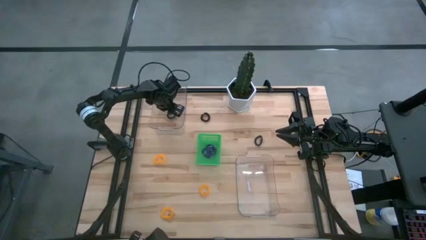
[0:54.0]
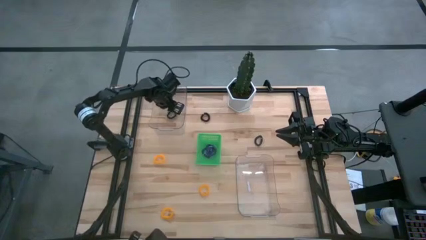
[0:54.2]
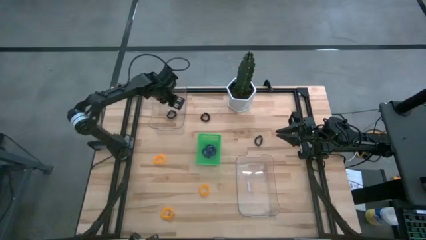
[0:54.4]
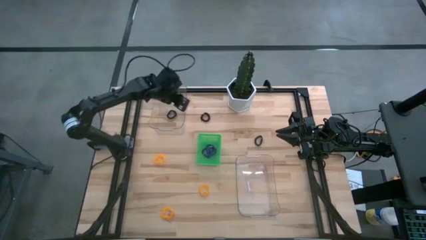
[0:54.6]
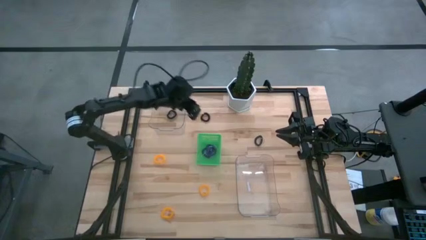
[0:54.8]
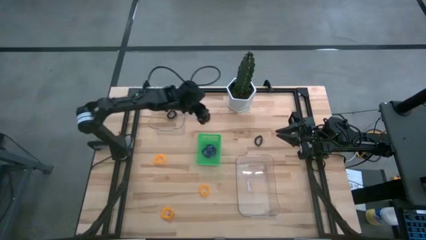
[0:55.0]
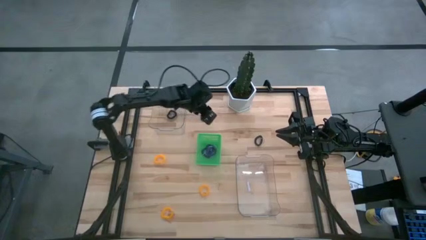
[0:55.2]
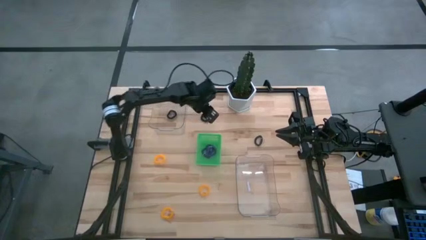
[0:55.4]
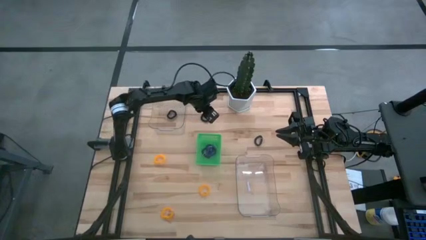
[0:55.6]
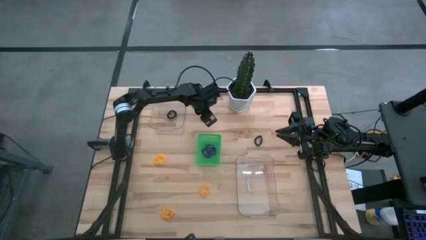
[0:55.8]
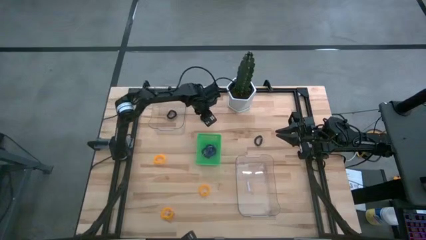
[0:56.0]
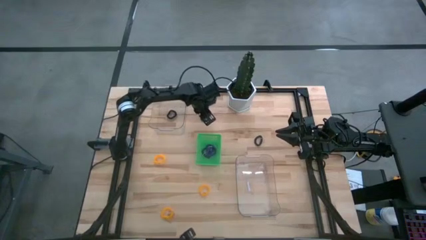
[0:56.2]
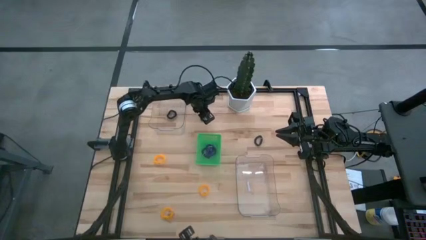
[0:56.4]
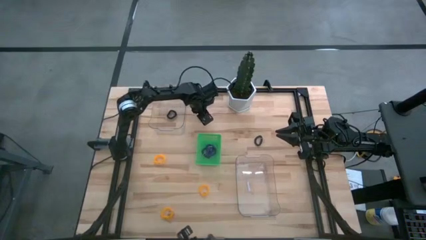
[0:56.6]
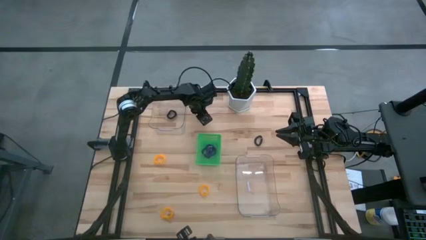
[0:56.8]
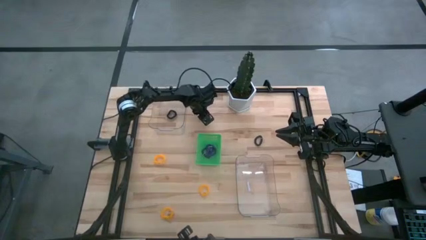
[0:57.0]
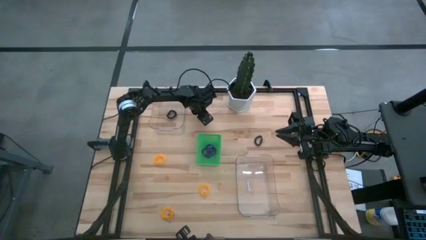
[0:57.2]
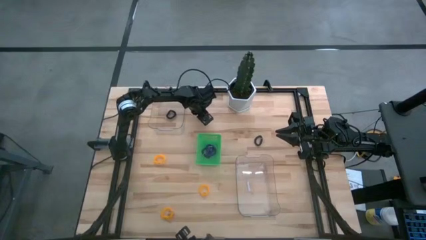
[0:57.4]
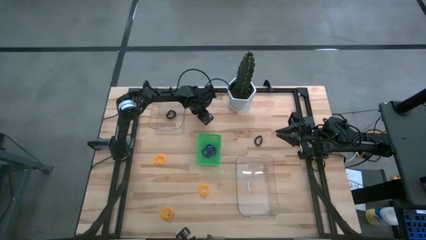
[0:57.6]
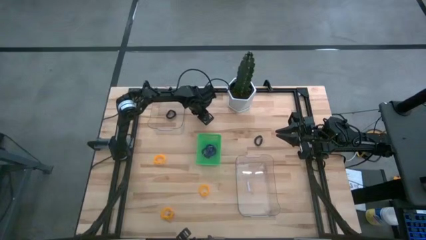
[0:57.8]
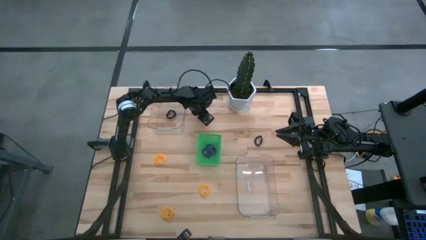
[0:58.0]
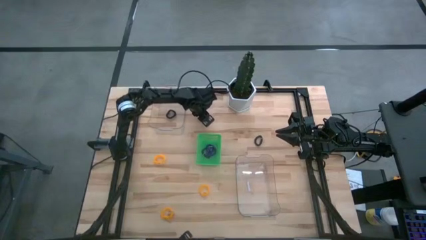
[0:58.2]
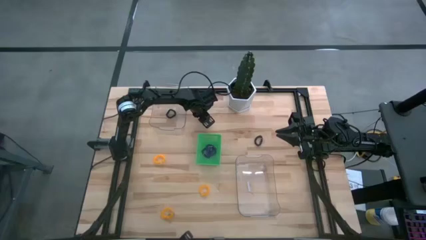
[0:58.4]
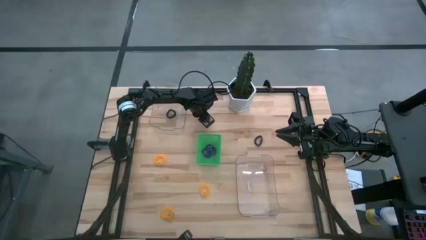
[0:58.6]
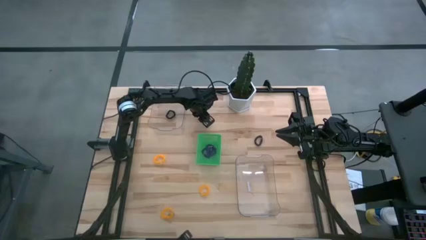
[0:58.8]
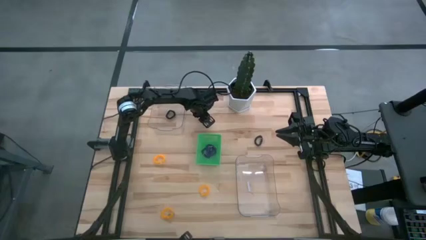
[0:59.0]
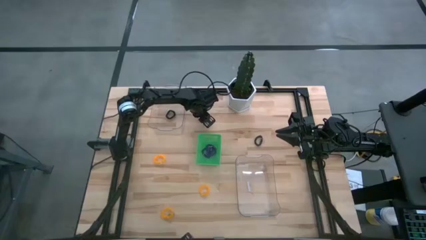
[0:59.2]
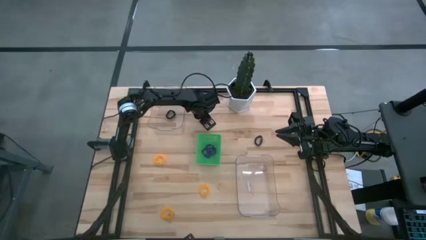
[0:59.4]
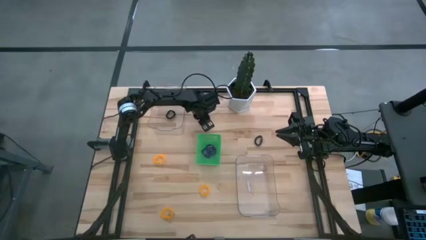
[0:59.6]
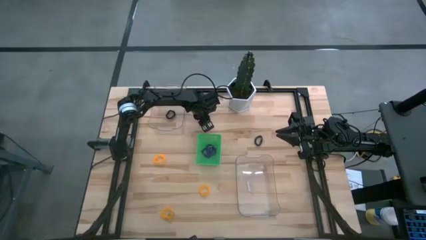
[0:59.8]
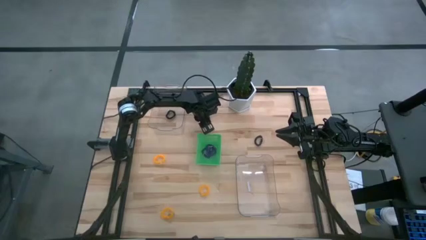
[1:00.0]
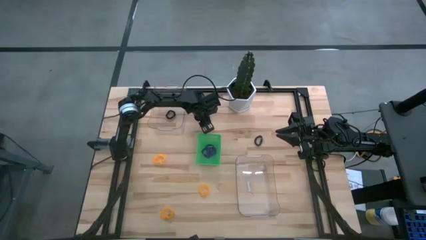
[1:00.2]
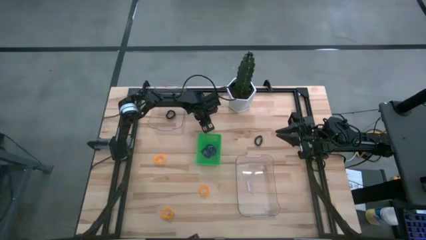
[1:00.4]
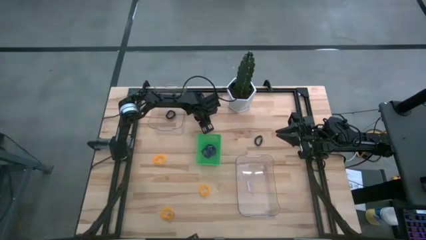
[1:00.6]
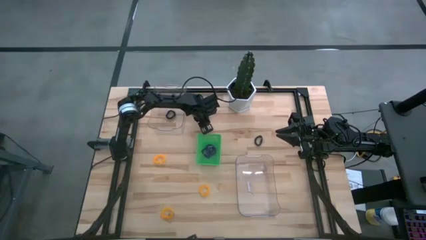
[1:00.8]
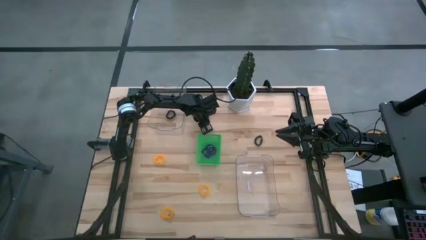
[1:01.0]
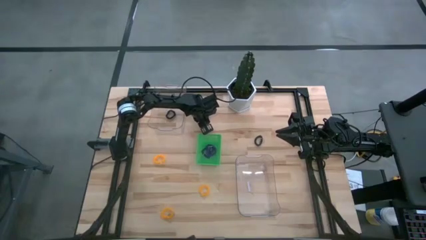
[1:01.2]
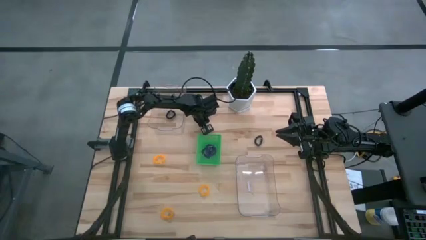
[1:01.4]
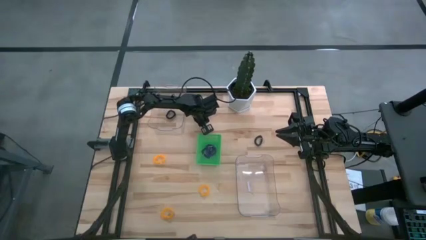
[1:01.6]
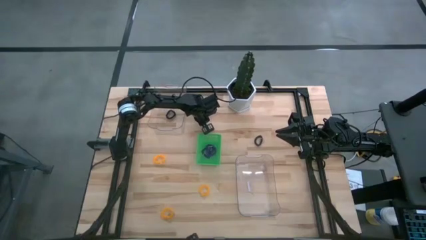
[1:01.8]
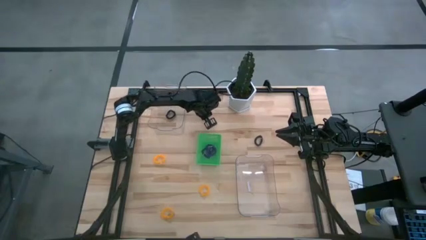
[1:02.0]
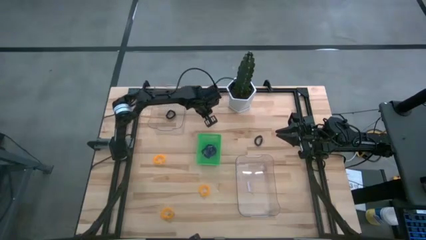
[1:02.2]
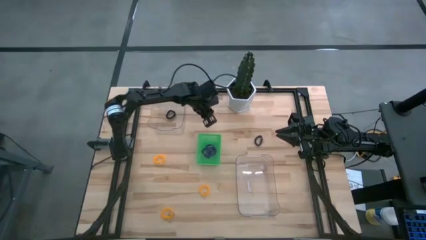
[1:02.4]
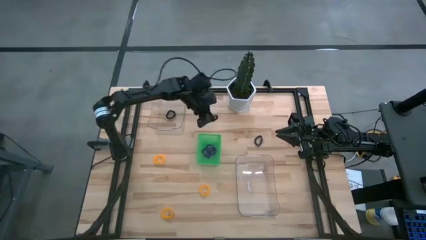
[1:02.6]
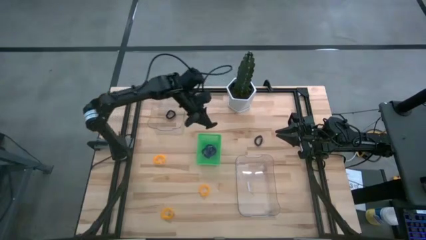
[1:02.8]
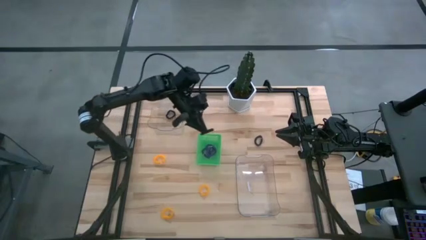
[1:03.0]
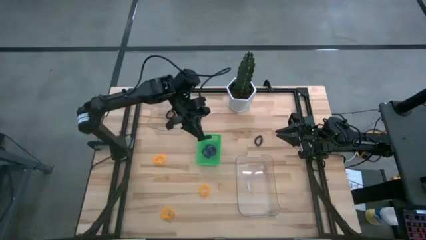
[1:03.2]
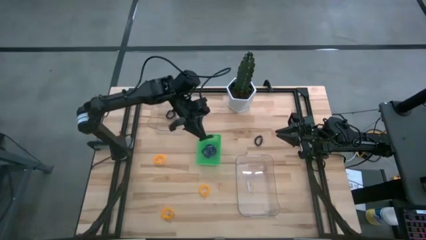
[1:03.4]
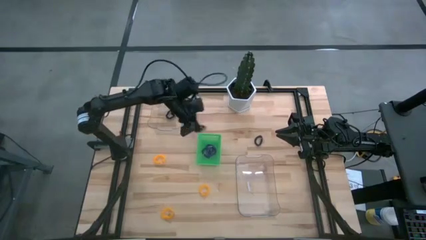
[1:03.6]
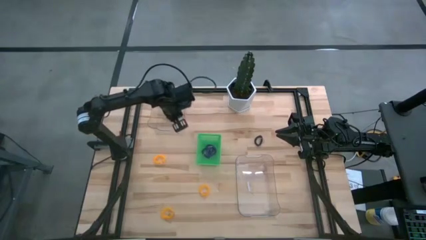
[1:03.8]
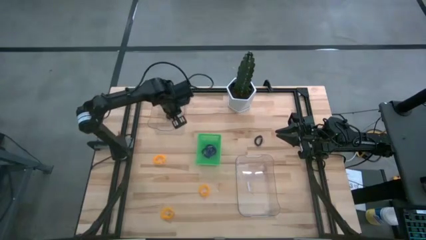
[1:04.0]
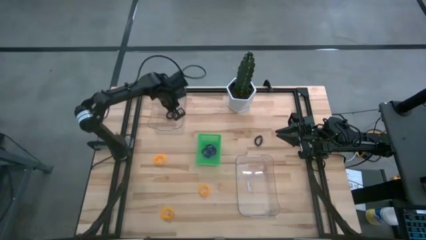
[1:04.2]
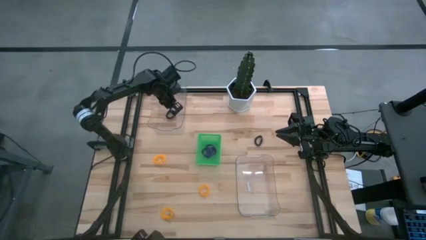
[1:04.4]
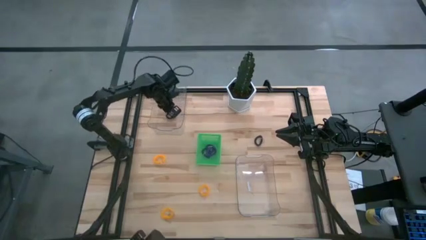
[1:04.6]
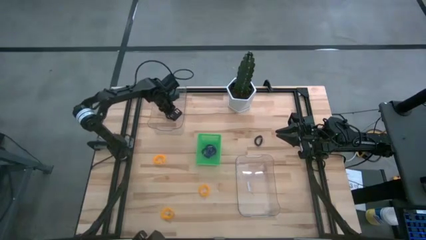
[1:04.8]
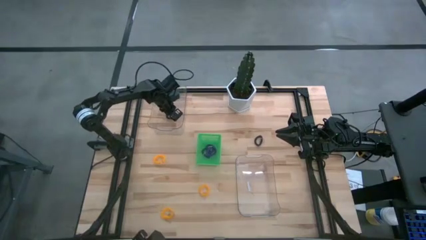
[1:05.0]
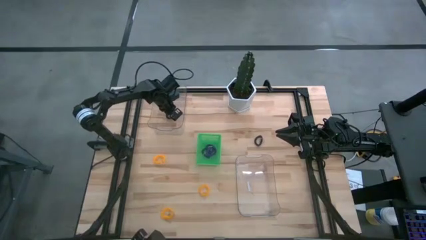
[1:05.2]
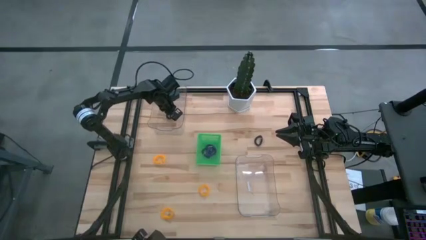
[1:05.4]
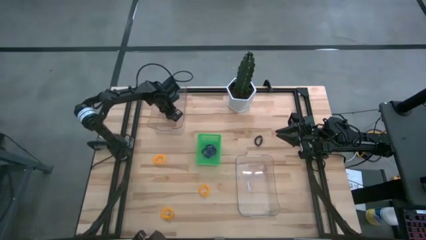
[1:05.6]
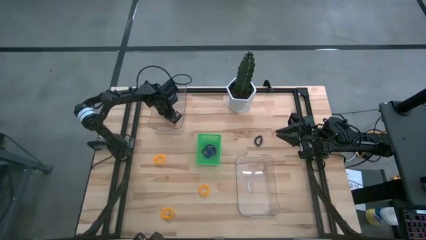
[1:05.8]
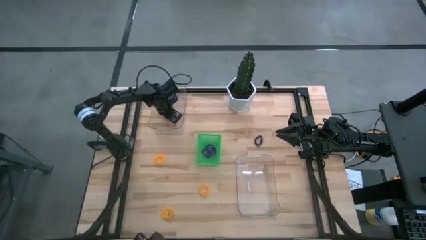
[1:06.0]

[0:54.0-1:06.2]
Task: Sort spring keychains
Put the top black spring keychain into the top transparent bin

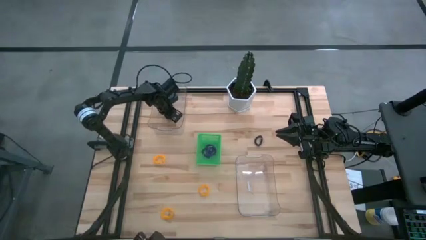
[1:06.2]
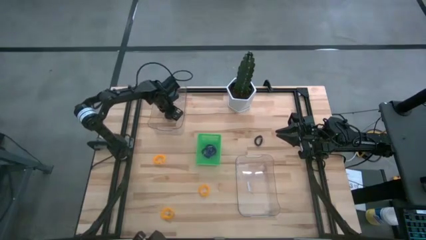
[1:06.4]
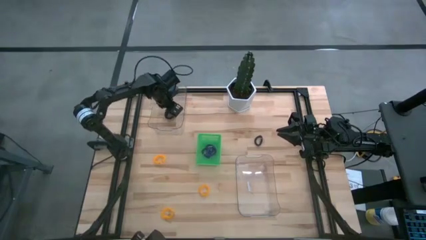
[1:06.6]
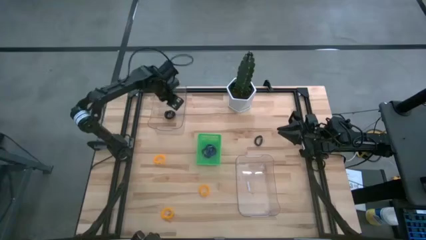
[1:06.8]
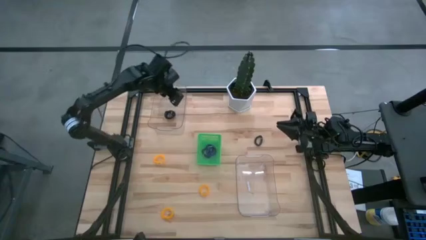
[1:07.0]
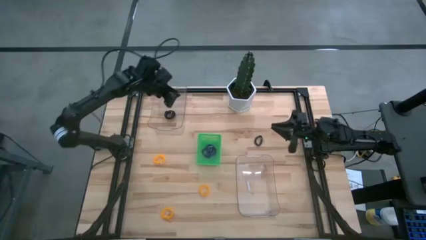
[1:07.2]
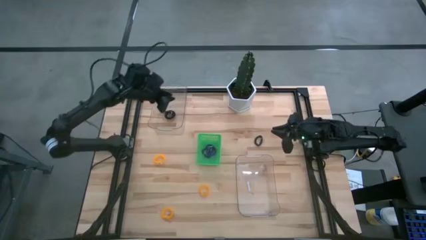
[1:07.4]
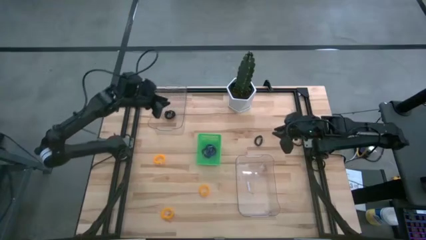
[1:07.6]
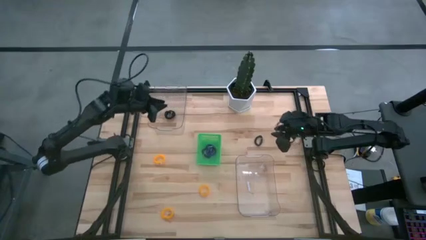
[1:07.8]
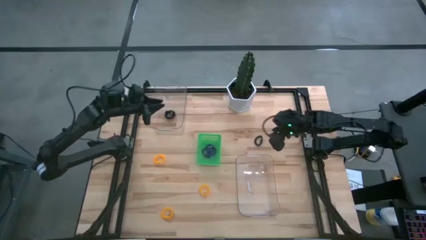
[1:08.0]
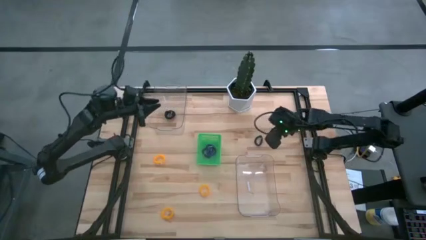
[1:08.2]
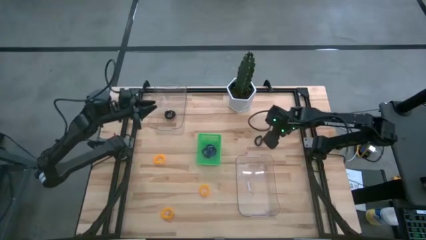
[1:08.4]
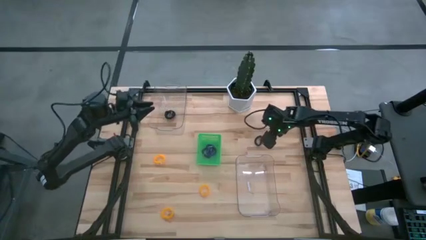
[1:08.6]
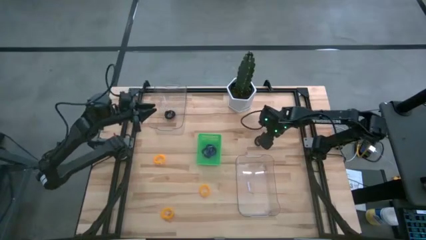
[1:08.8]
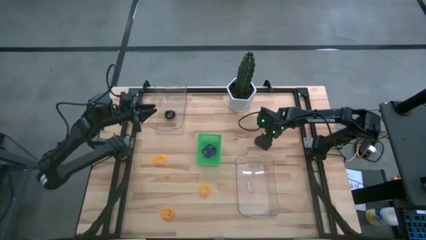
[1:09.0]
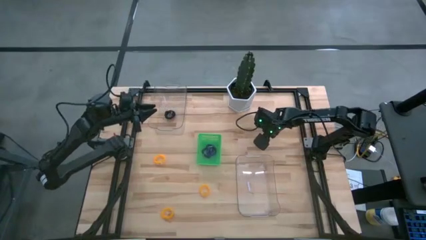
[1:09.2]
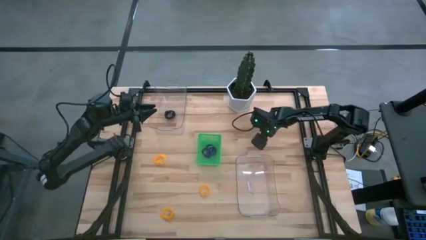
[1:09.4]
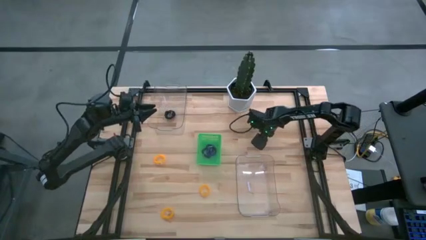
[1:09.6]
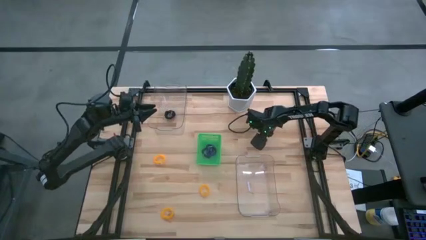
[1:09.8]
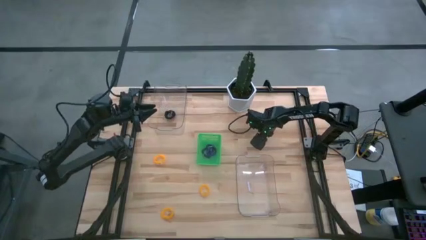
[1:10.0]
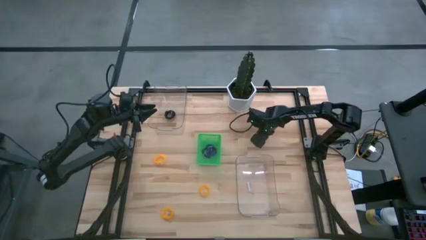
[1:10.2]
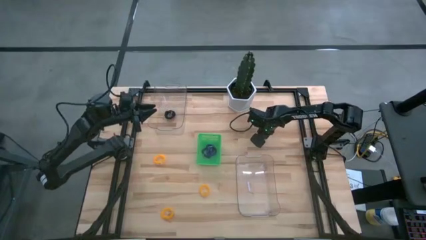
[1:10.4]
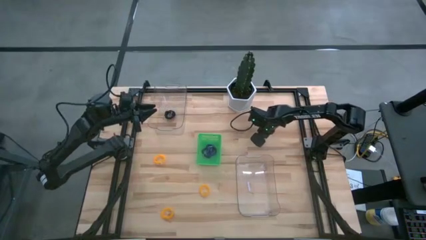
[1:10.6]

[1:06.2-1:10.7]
Put the black spring keychain into the top transparent bin
